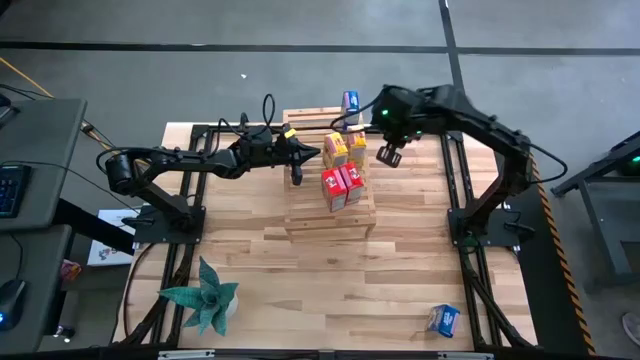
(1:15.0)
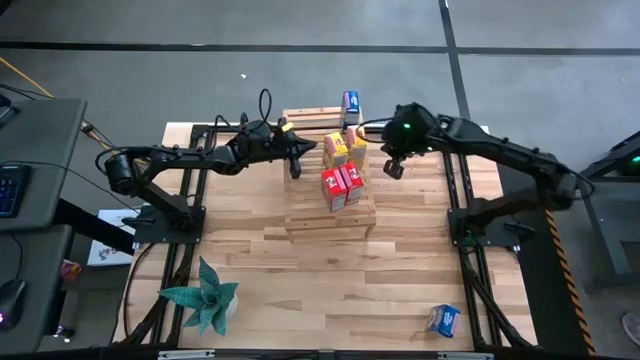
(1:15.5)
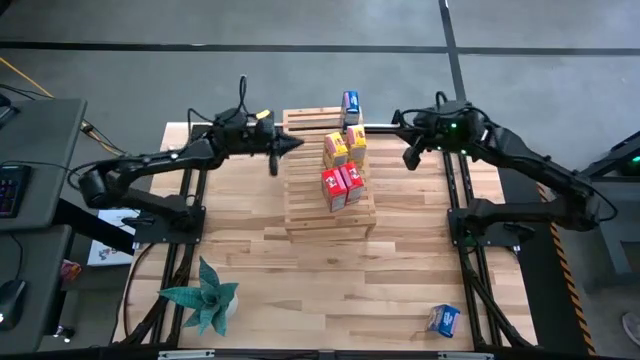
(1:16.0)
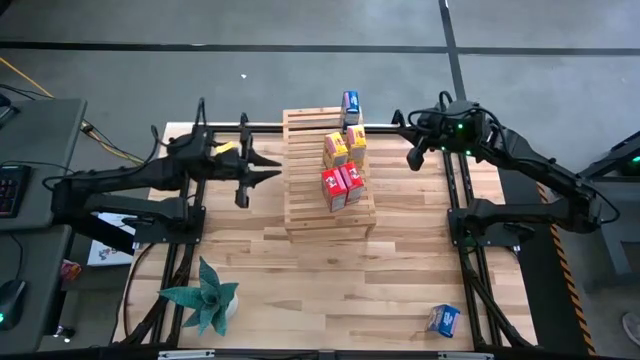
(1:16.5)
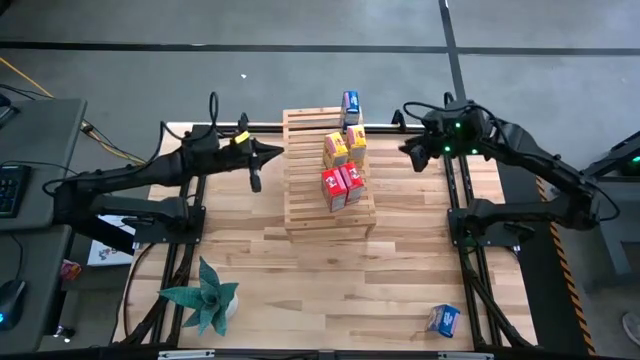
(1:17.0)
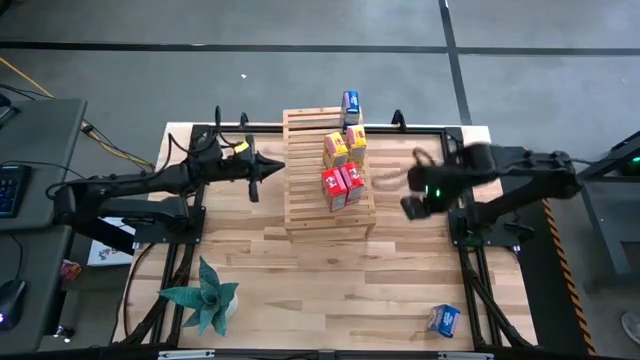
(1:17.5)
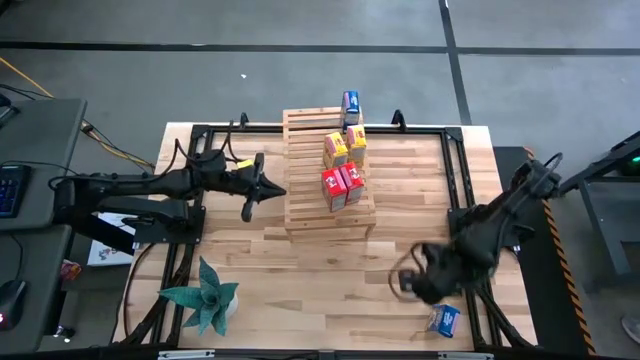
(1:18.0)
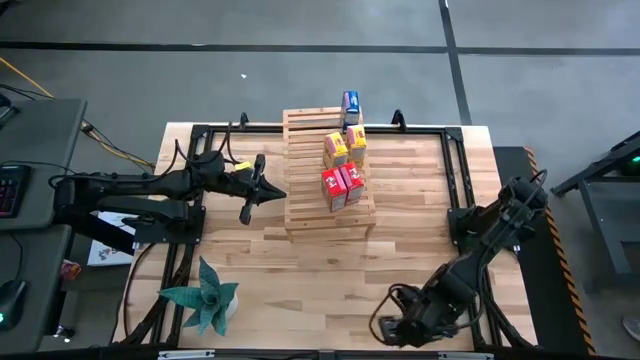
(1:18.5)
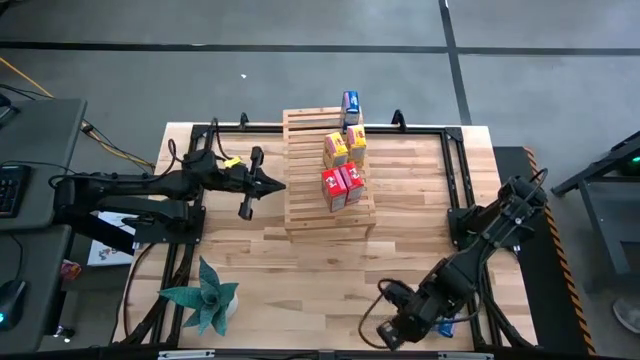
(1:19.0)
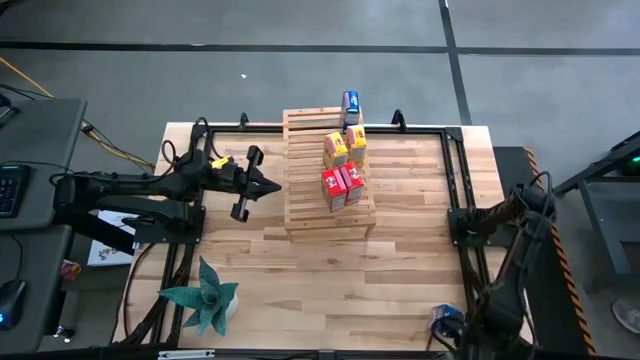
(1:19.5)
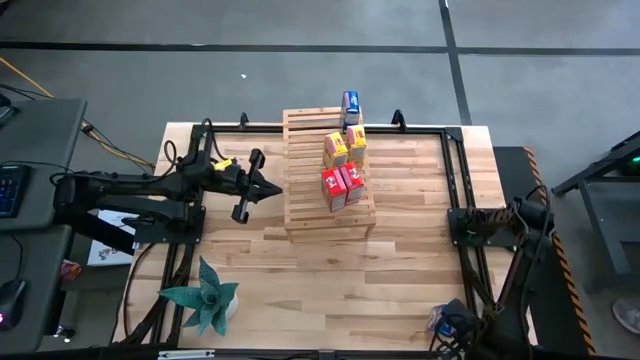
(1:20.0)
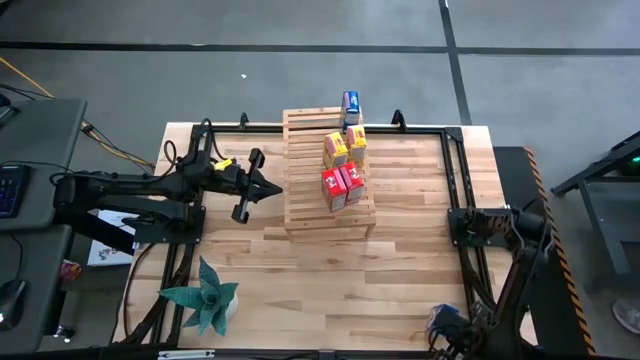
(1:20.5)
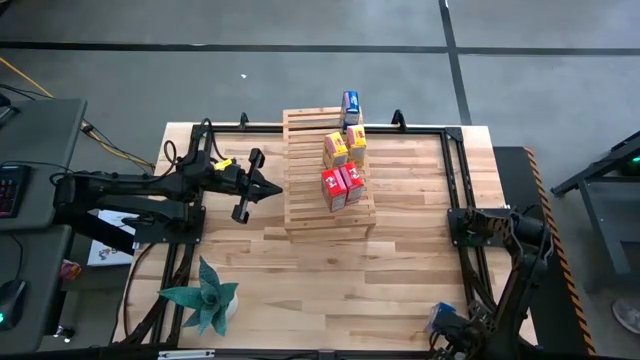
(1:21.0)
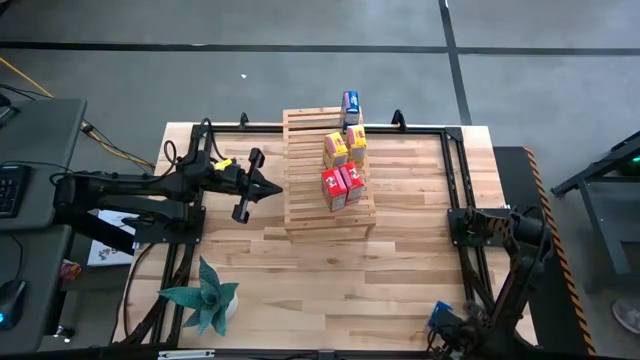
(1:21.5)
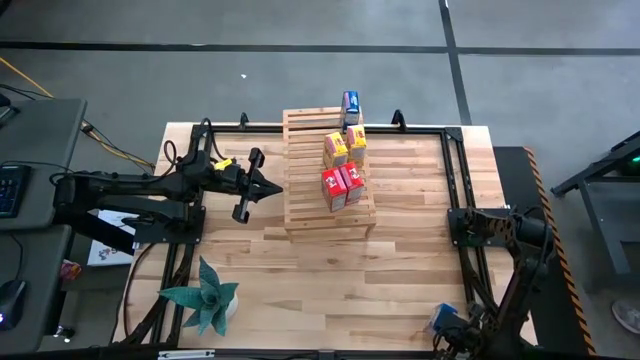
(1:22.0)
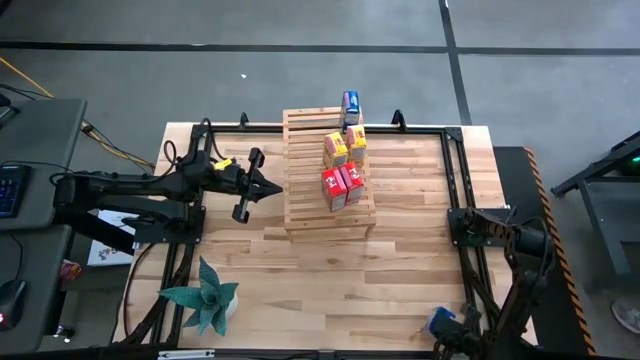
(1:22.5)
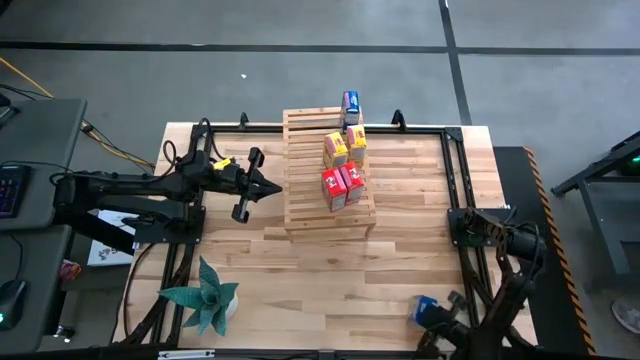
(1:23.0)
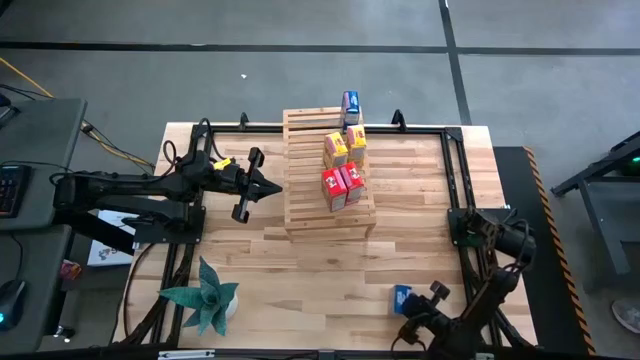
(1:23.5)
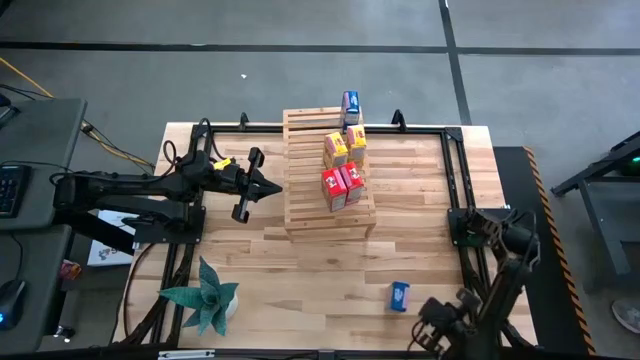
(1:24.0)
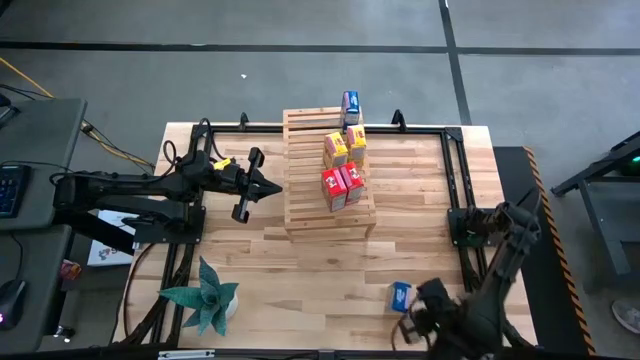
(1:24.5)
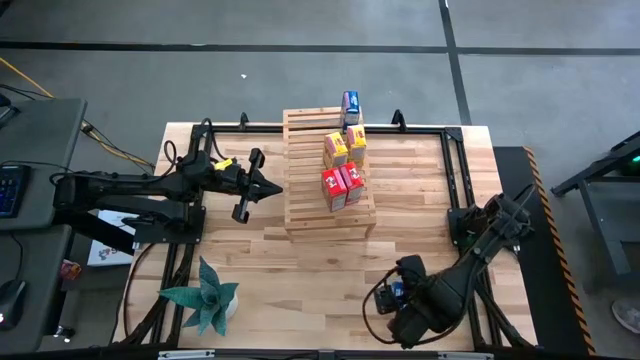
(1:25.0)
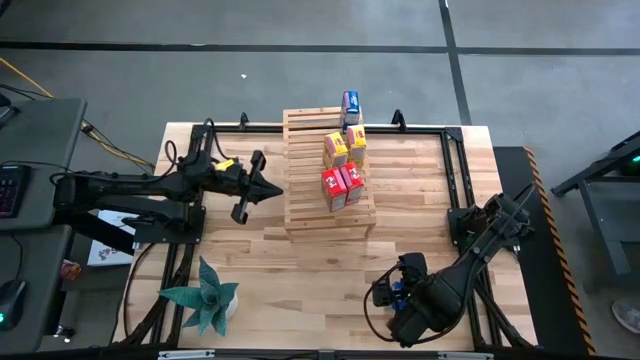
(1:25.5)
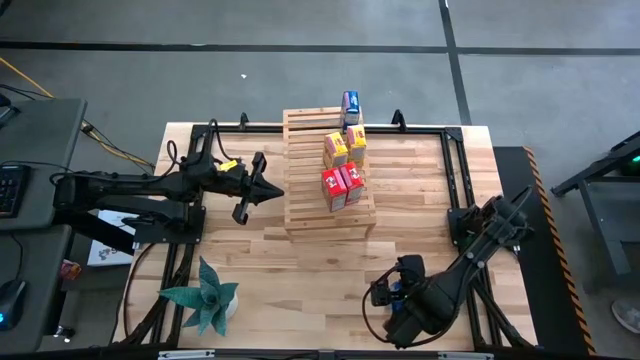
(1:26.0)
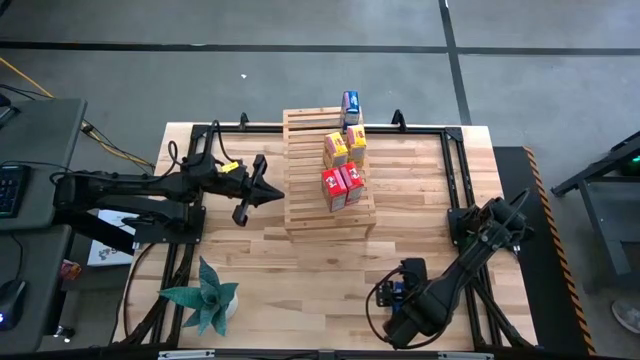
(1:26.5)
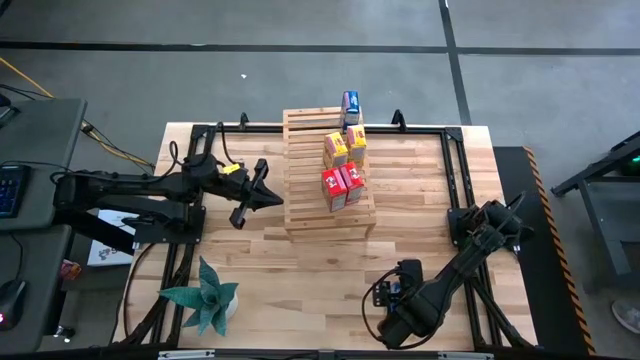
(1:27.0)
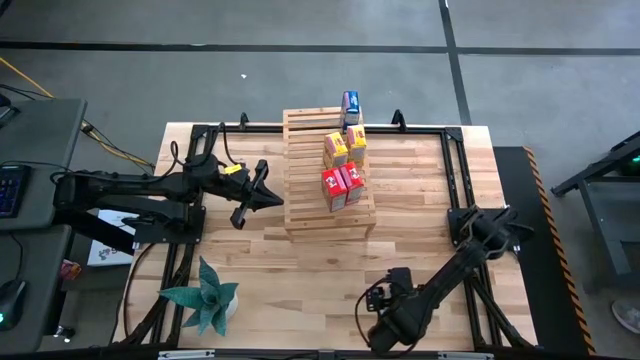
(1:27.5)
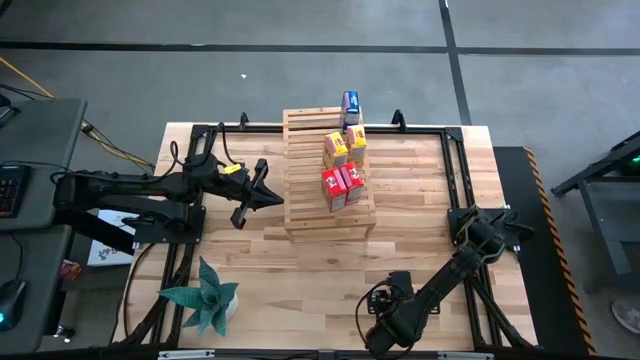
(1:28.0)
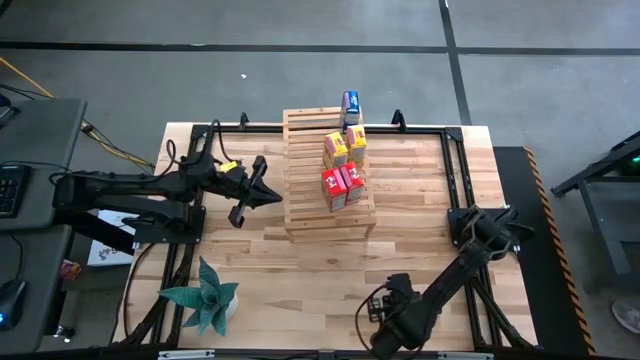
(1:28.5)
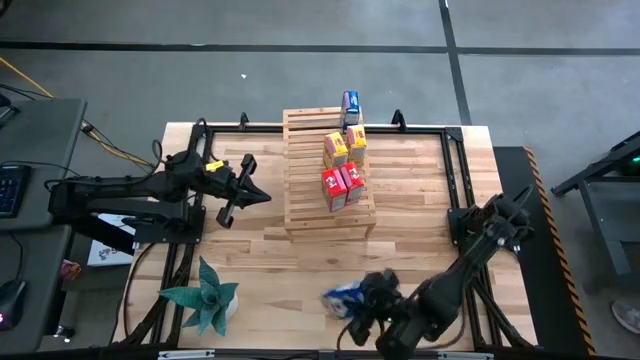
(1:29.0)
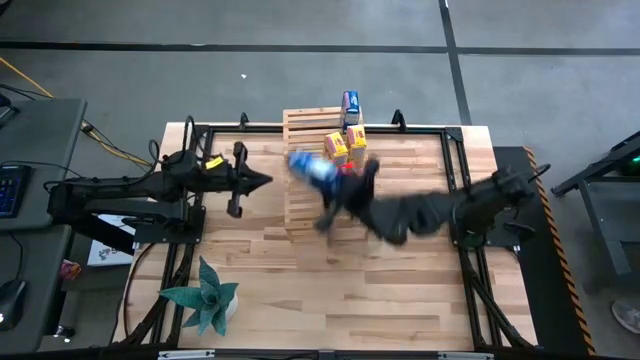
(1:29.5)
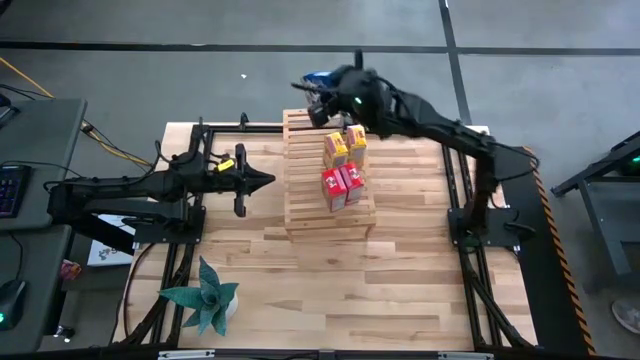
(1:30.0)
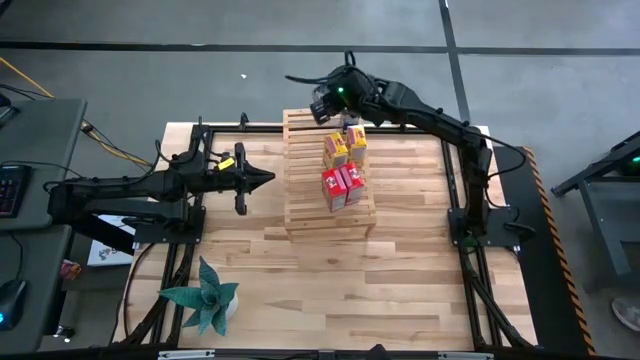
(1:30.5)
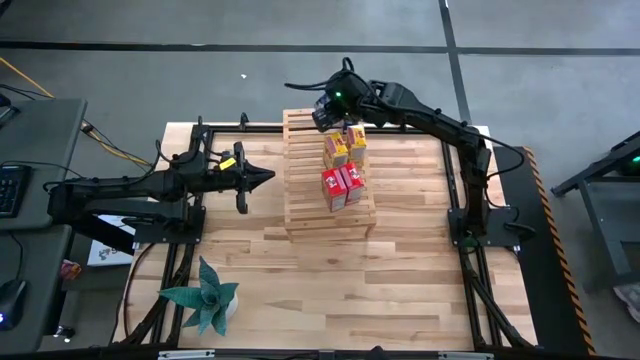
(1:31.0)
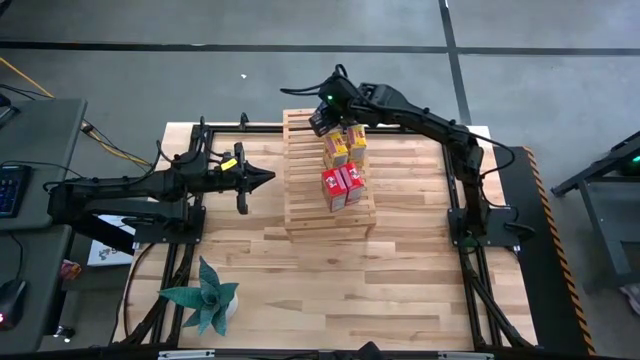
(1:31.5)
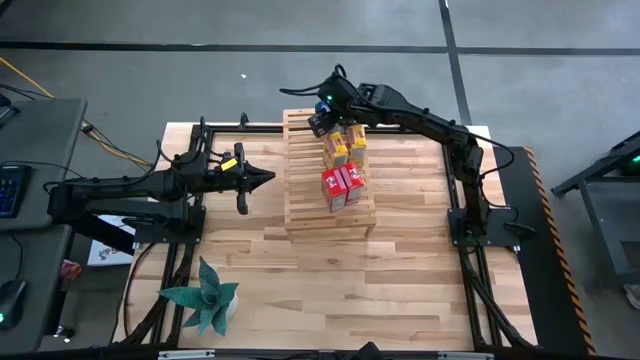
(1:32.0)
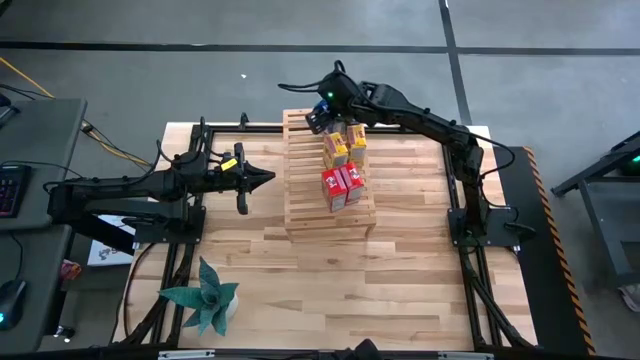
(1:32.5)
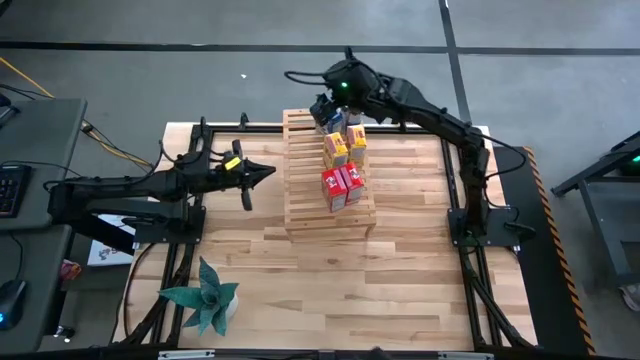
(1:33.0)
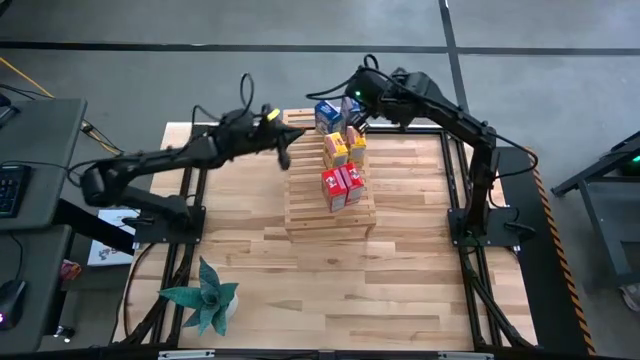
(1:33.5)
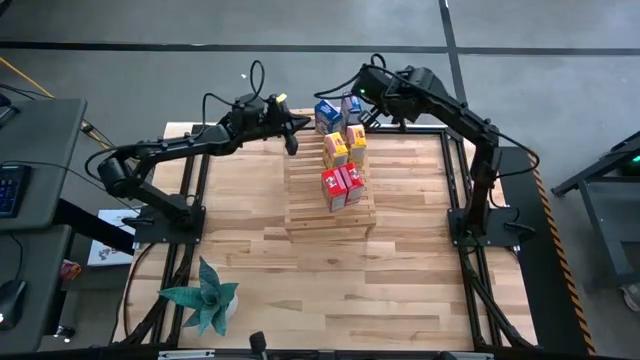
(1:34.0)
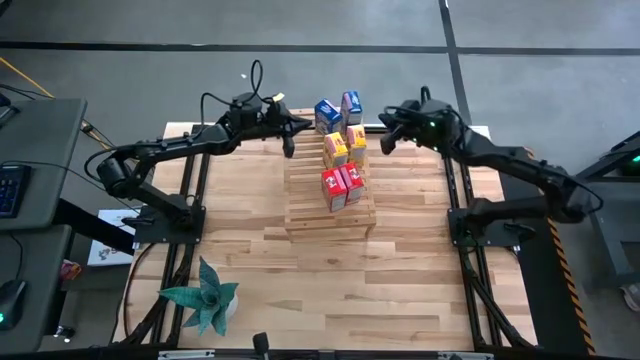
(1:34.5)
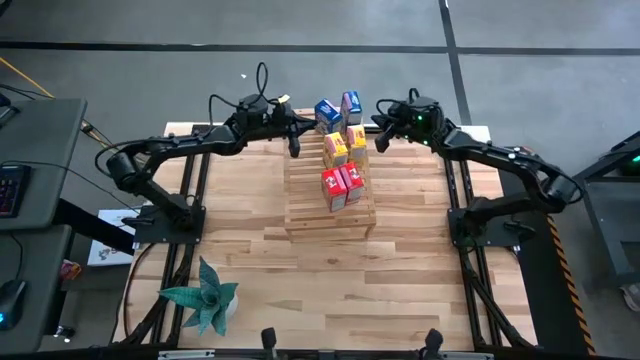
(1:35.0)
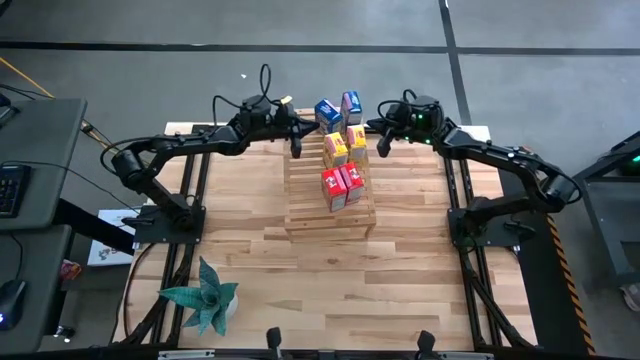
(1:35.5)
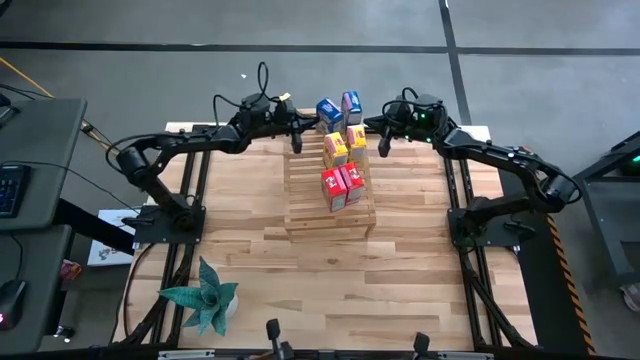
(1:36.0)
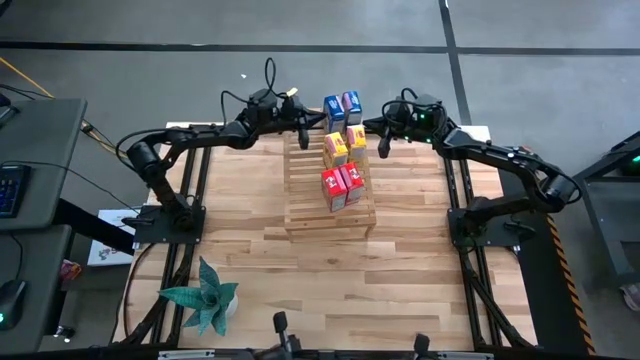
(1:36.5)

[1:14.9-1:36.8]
Task: Stack cereal on shelf
Put the blue cereal box on the shelf aligned with the other blue cereal box
